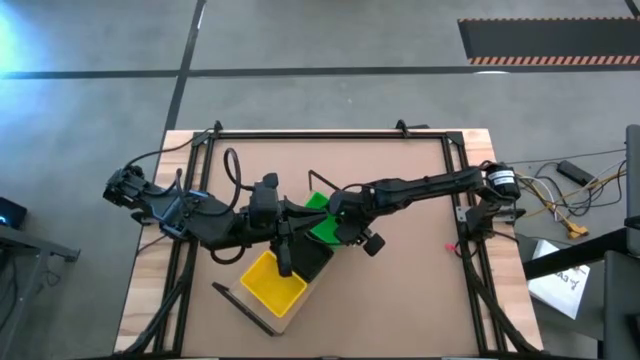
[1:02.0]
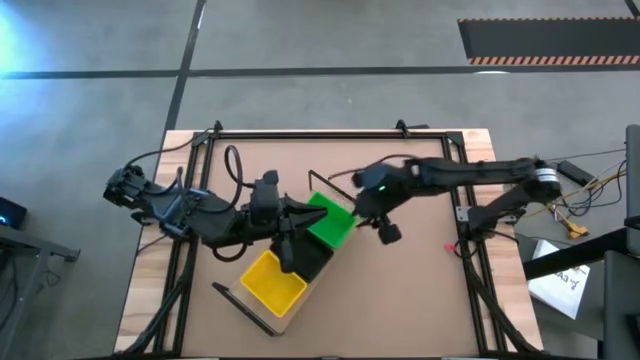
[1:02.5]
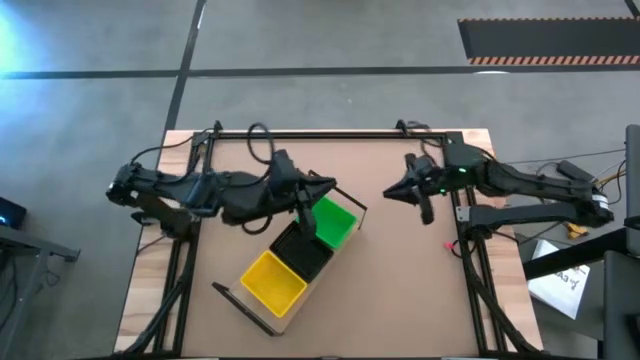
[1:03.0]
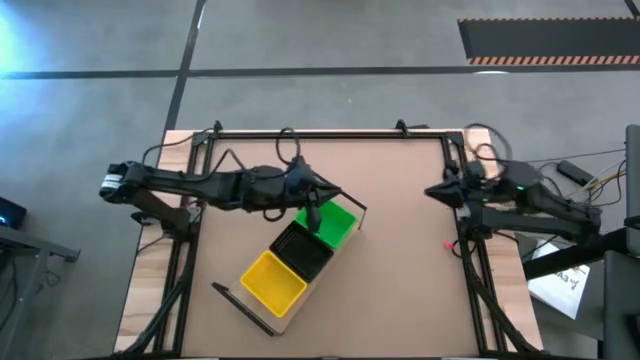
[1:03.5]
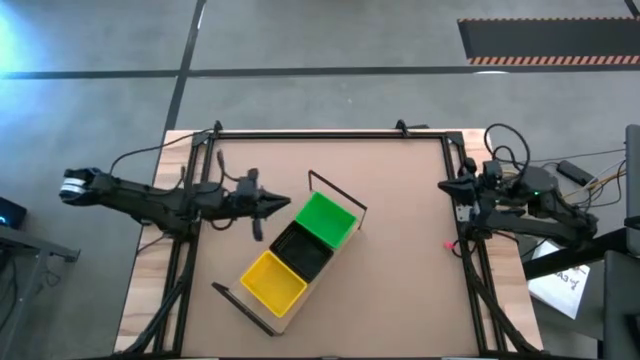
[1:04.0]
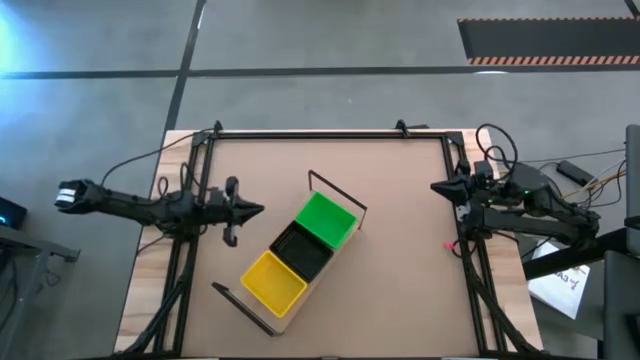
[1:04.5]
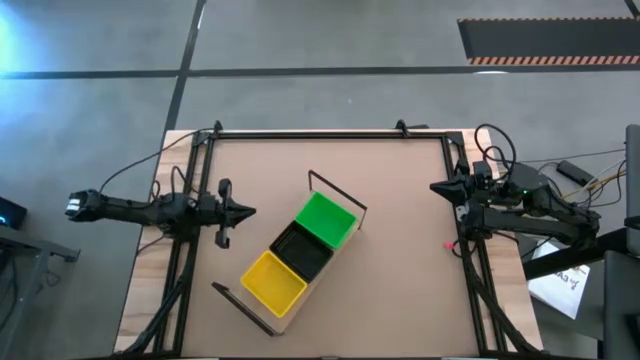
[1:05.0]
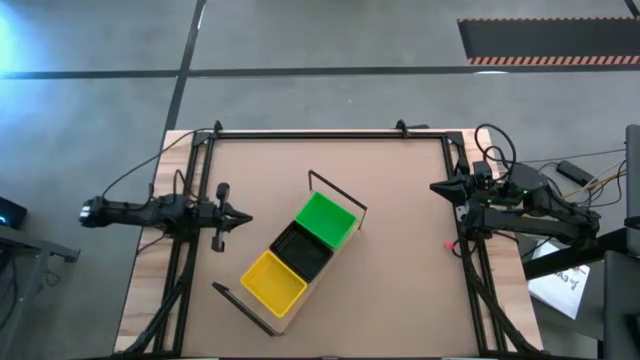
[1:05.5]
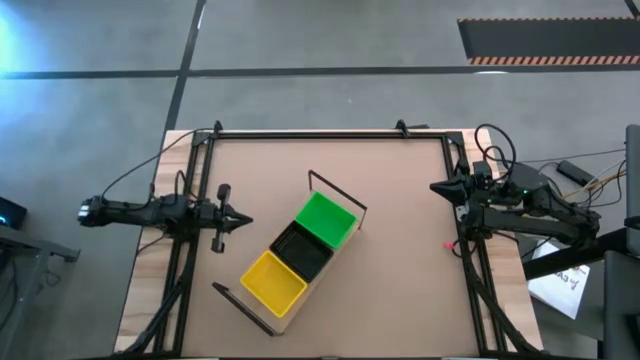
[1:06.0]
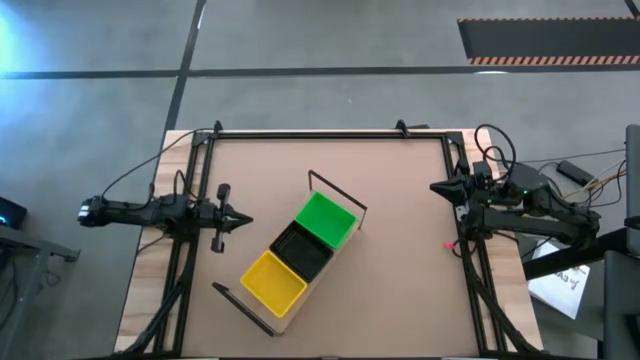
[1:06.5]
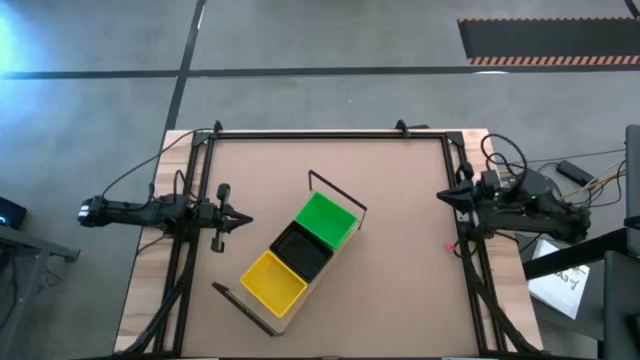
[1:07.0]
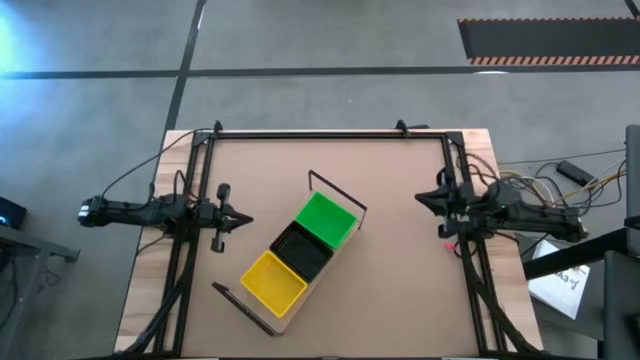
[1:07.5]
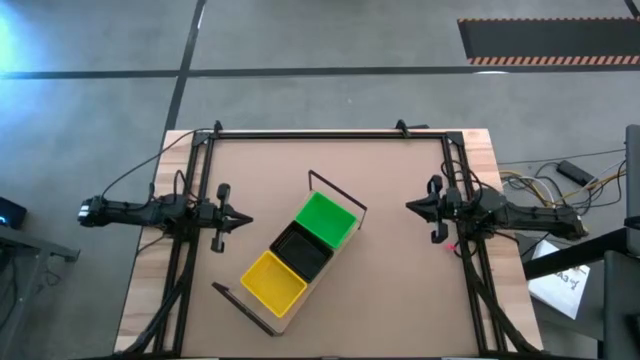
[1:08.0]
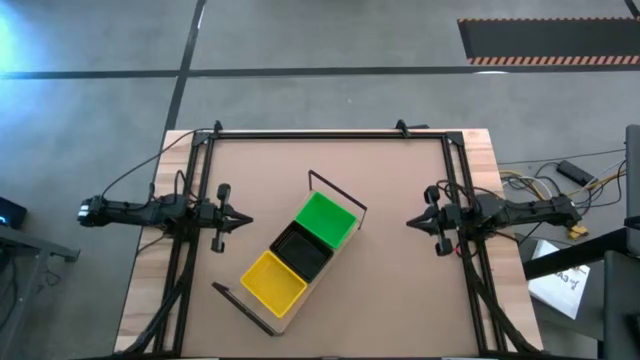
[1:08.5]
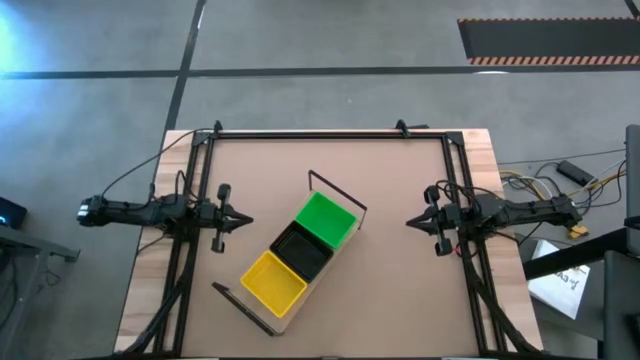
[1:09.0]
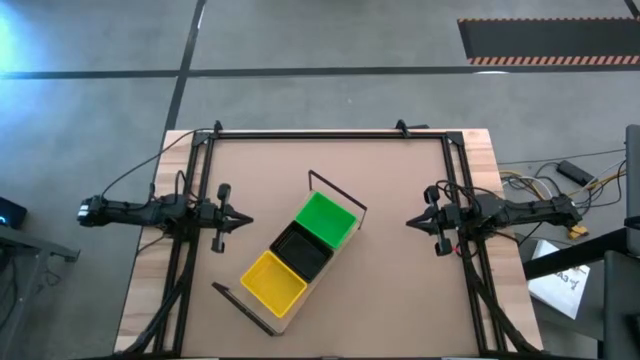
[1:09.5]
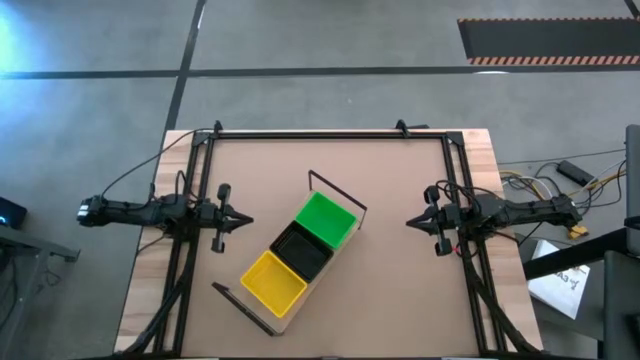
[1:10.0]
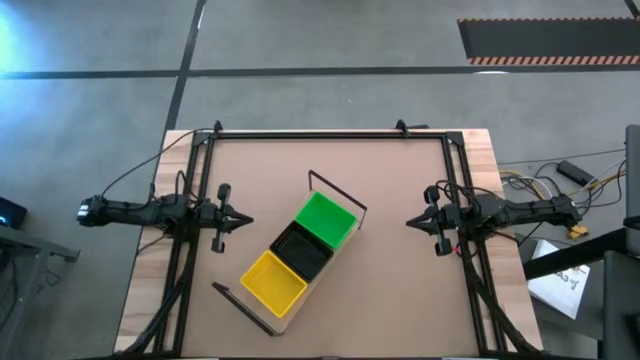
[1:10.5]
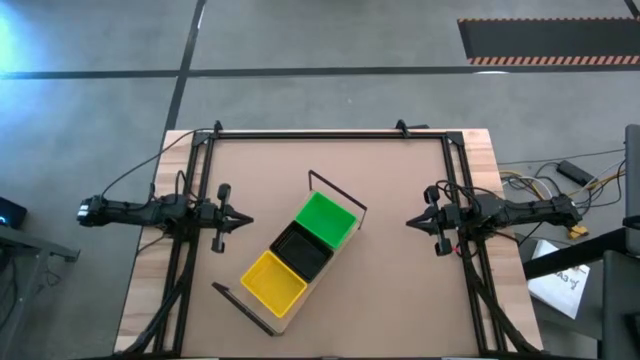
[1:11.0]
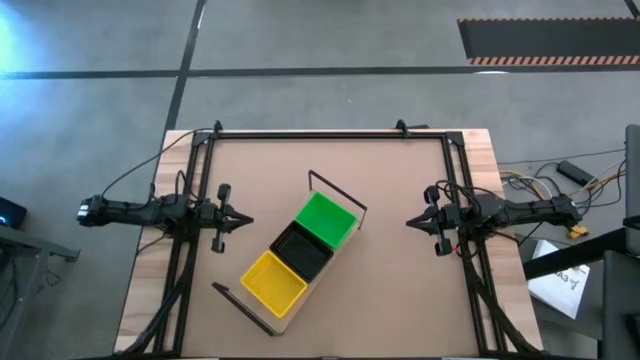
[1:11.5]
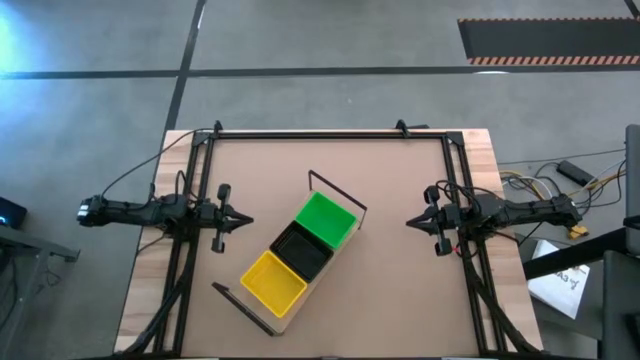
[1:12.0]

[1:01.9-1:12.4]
Task: Stack baskets on shelf by color
Return to Home Position

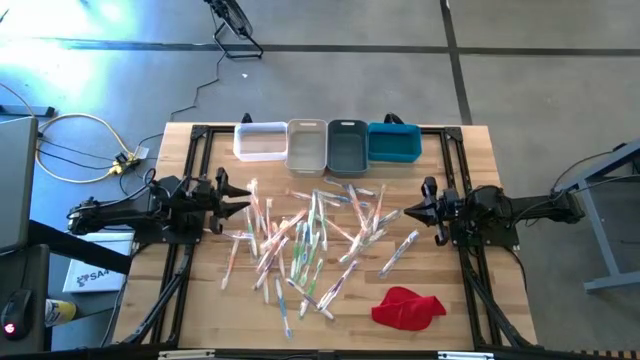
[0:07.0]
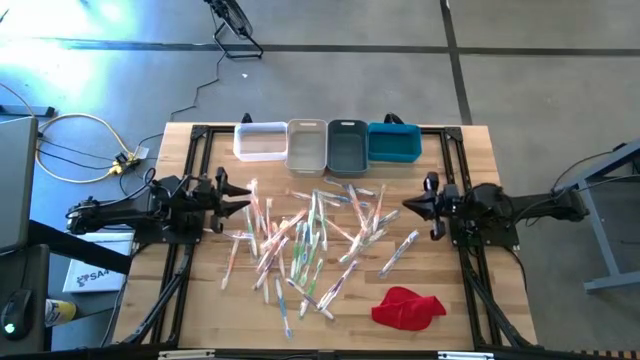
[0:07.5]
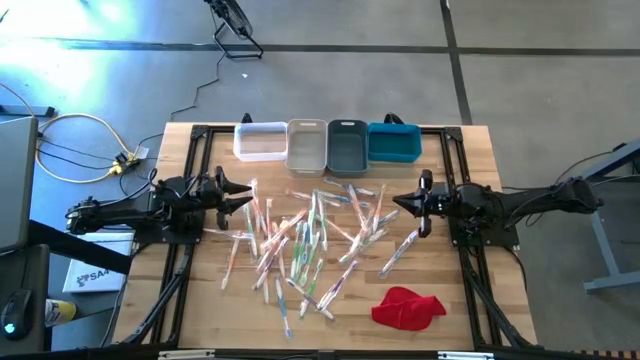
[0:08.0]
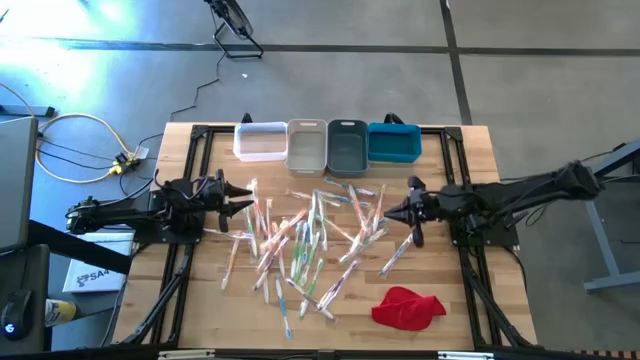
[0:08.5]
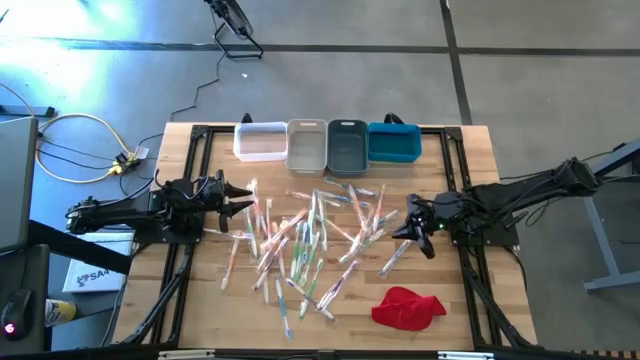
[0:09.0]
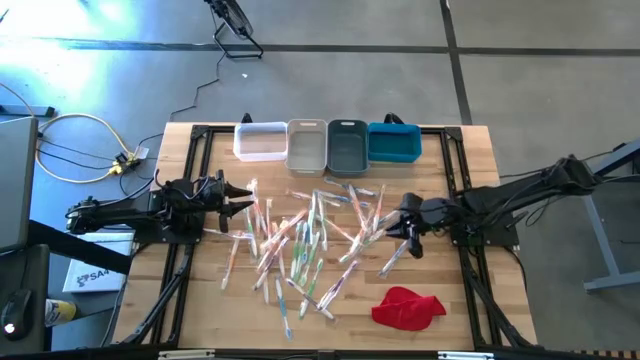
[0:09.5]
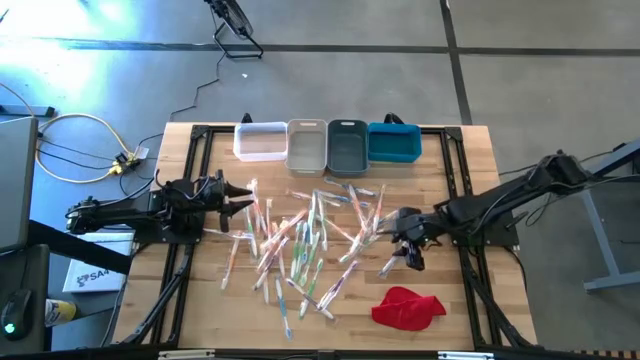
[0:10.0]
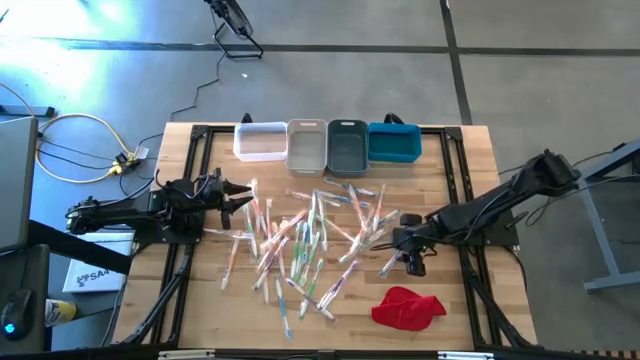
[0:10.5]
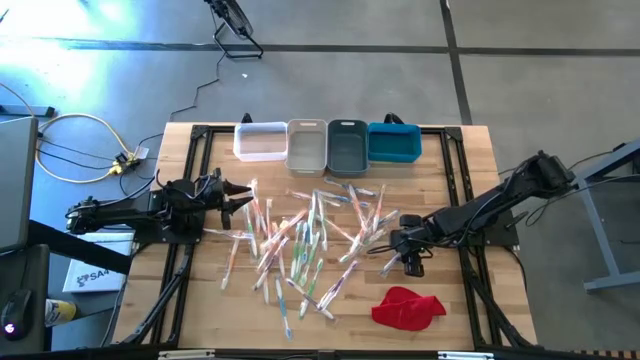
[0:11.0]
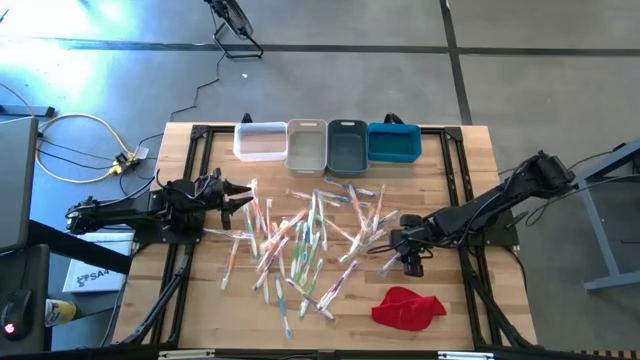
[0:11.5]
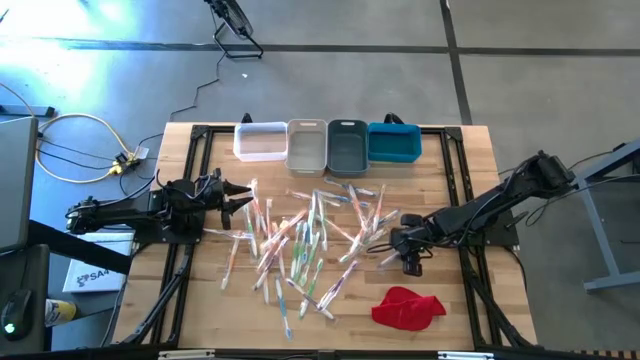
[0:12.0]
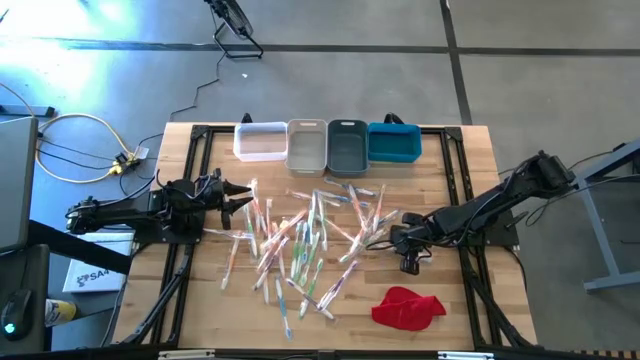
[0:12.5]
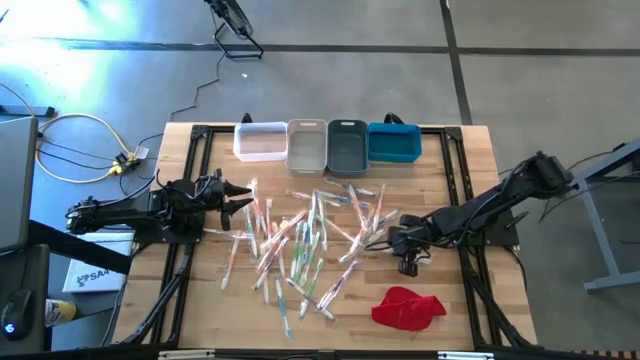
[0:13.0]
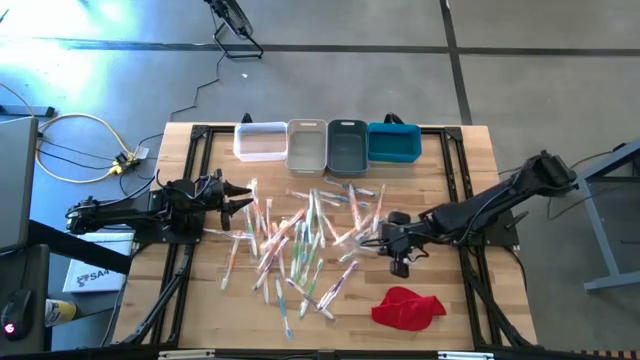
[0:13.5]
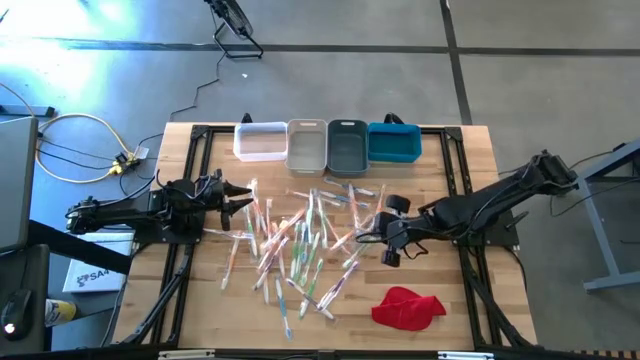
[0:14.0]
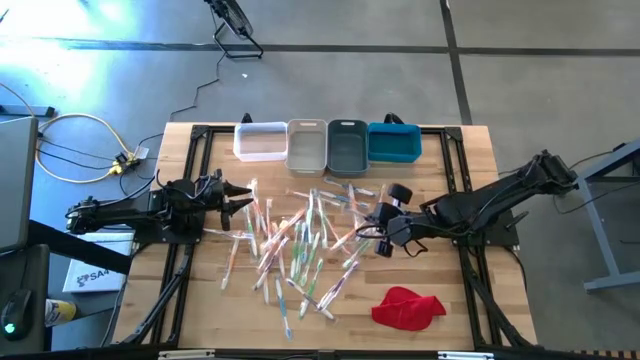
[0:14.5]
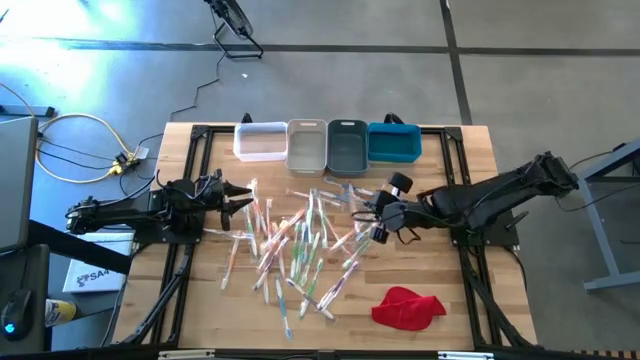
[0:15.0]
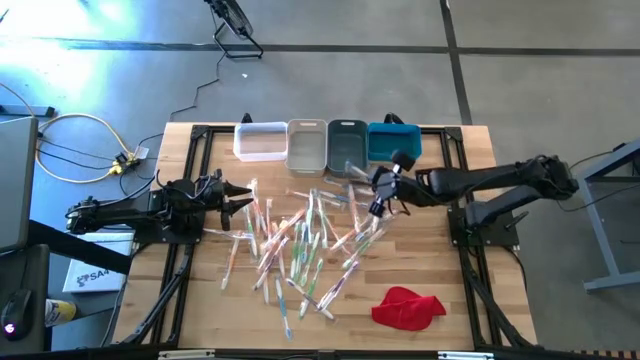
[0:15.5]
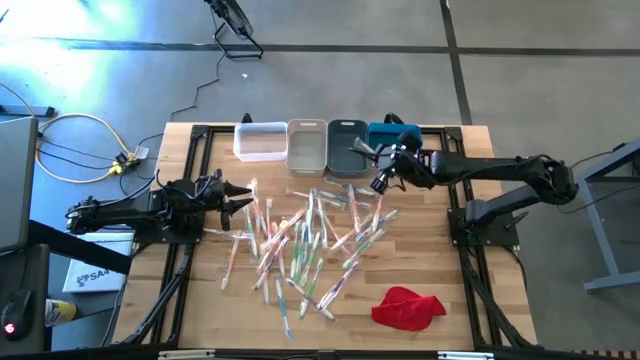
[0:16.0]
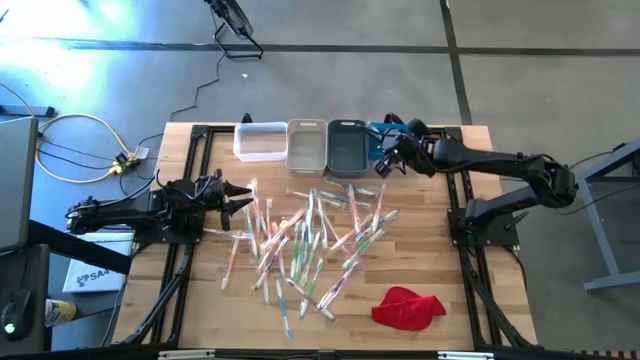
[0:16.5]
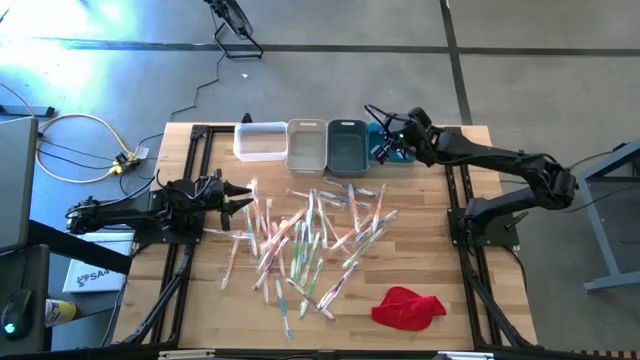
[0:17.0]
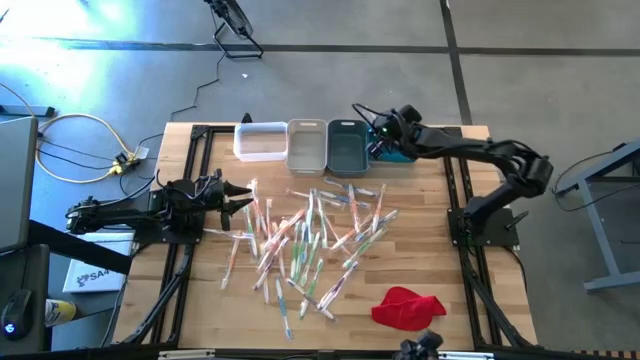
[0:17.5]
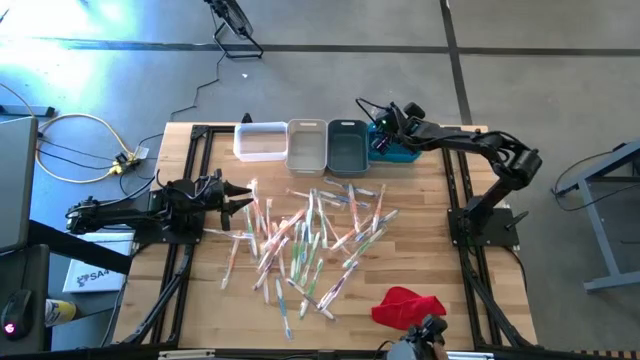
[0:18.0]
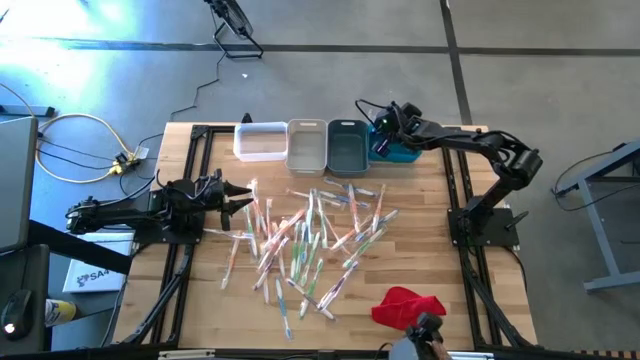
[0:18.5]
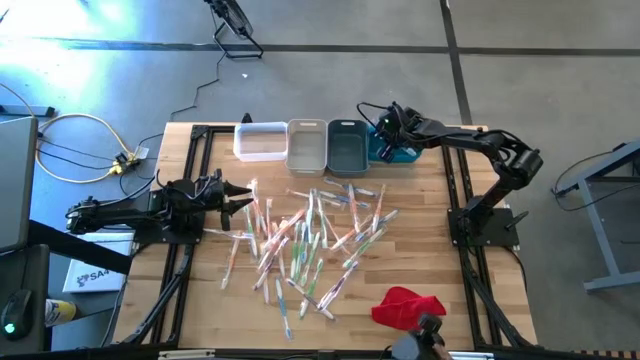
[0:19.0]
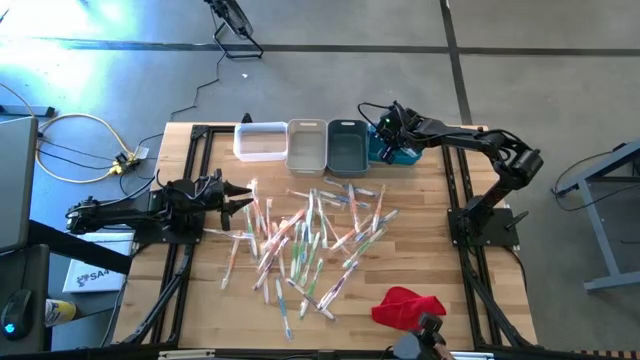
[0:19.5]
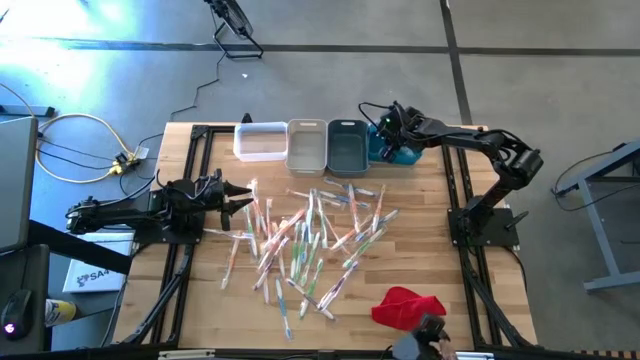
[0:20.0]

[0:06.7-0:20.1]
Task: Pick & Place Toothbrushes
Put the blue toothbrush into the blue bin
